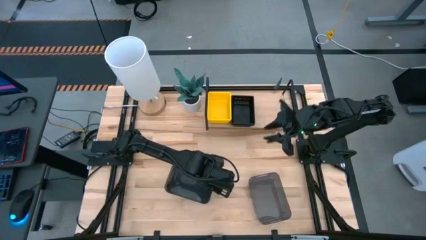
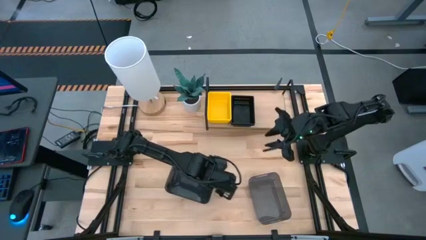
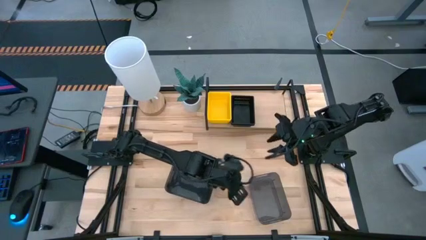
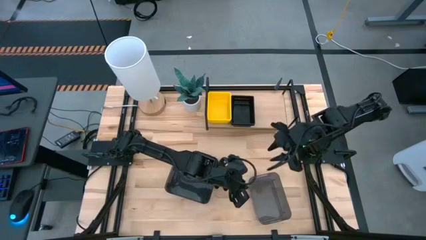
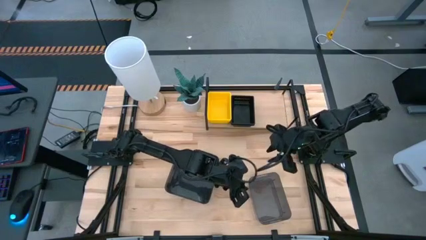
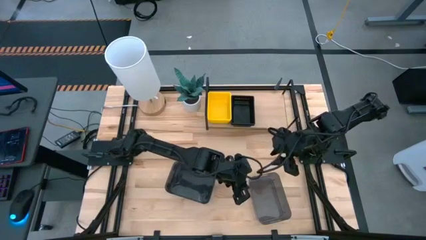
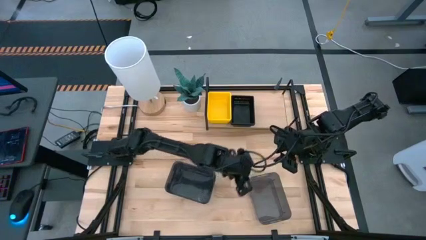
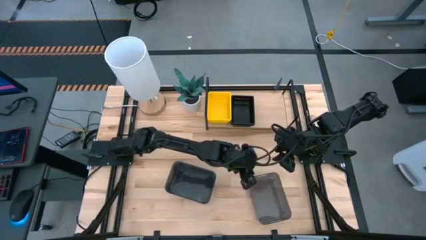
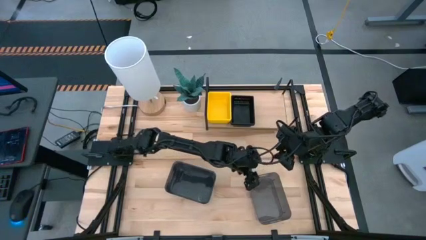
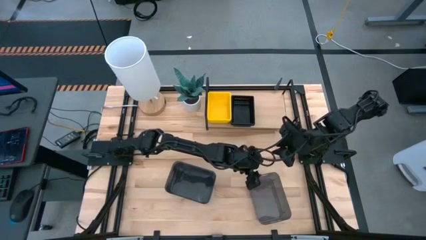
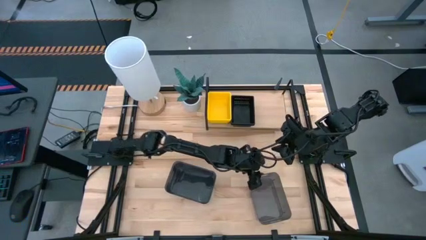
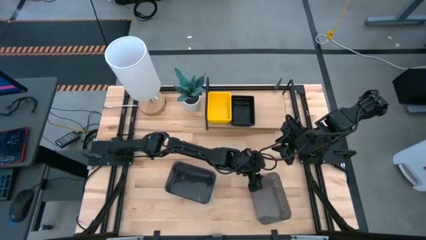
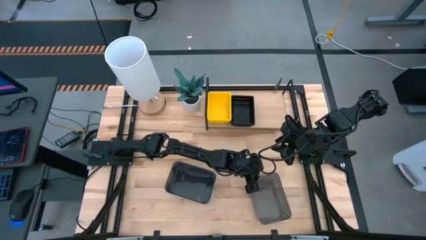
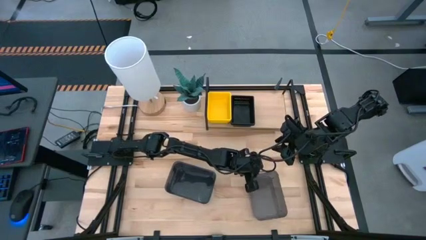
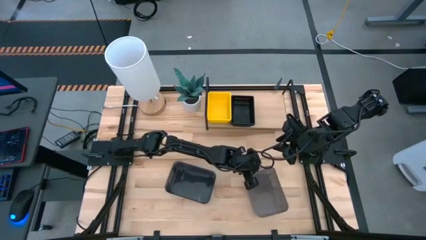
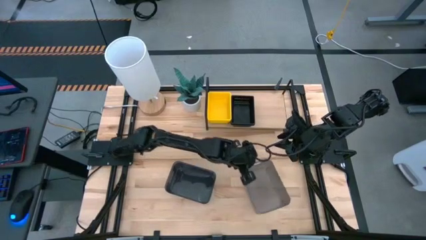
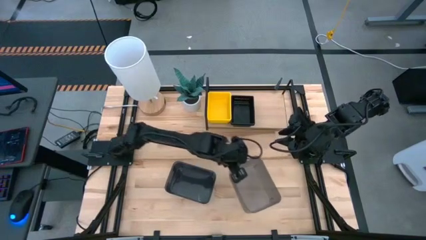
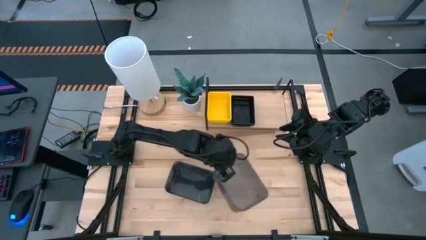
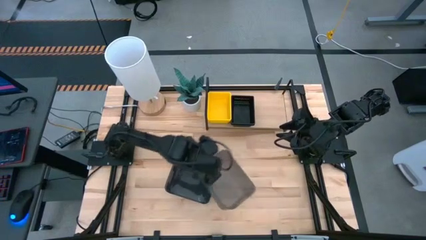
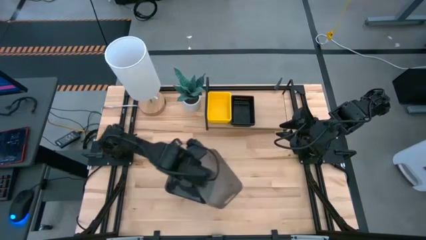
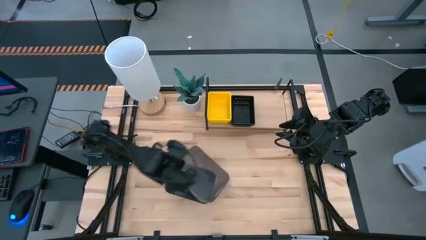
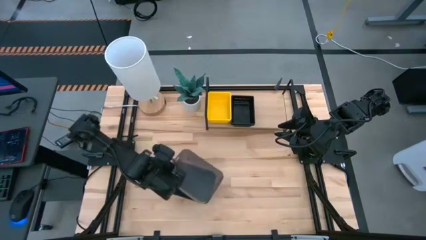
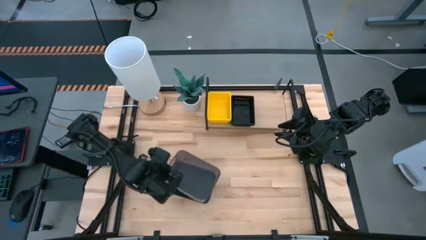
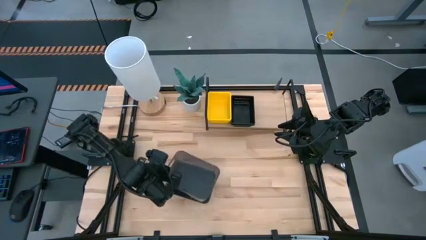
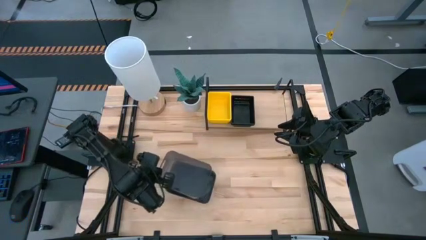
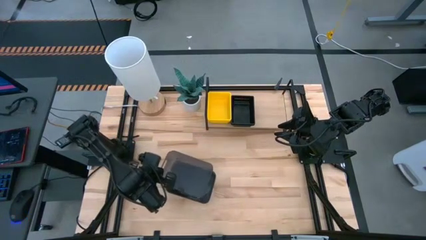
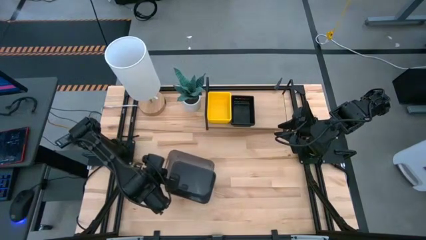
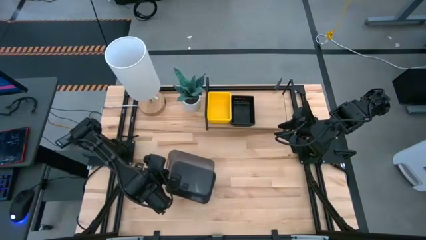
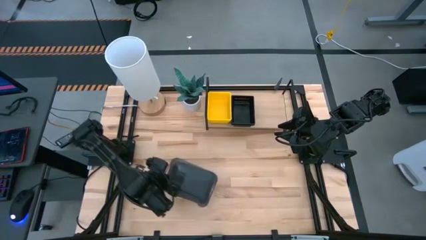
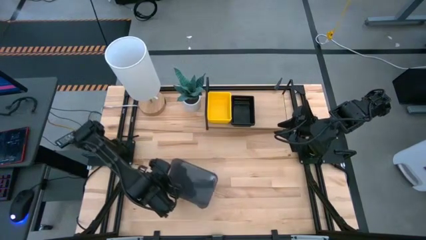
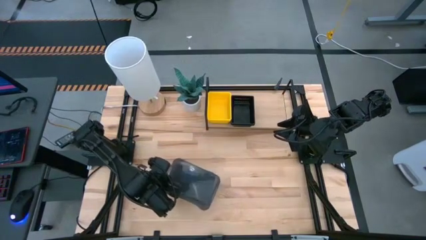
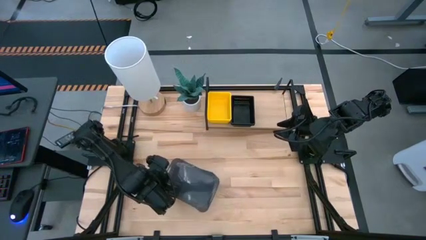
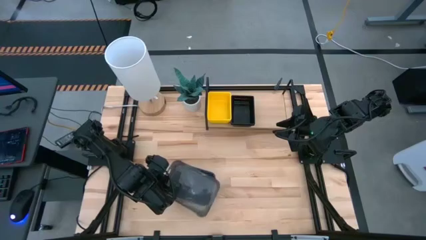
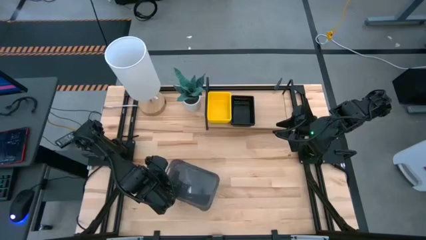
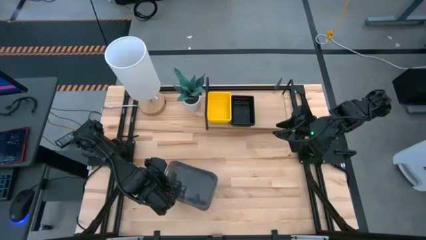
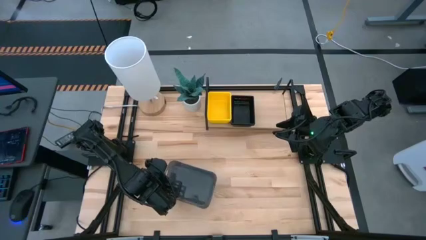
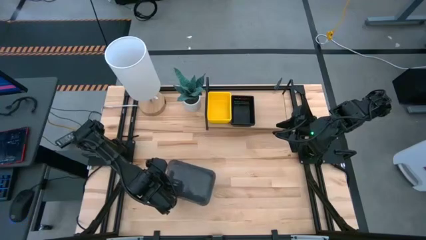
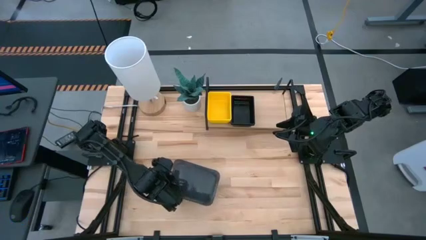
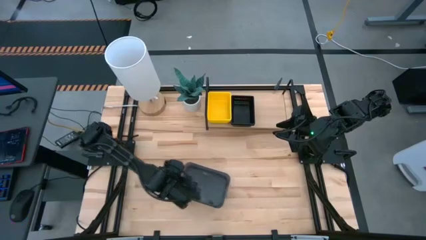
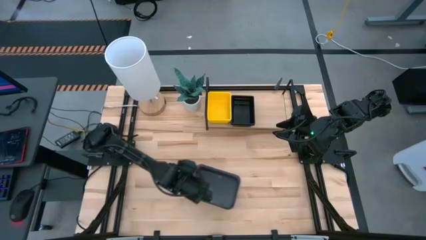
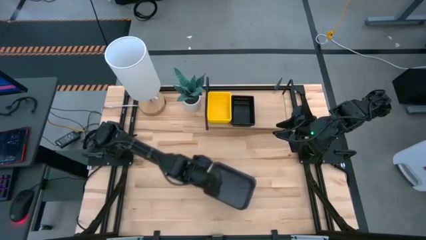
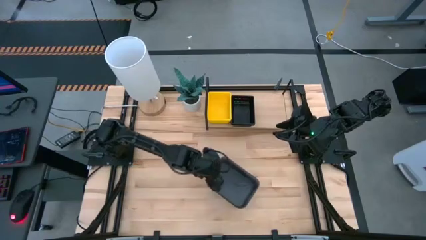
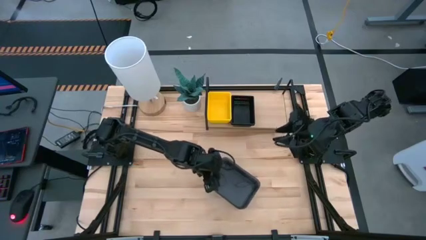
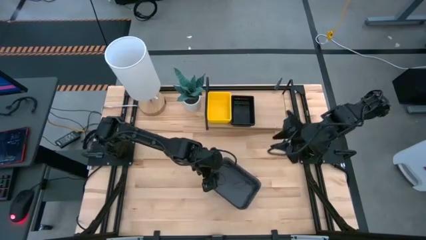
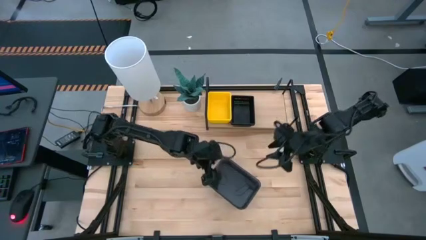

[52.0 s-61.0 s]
Task: Stack baskets on shelf by color
Stack the right gray bin on the left gray bin

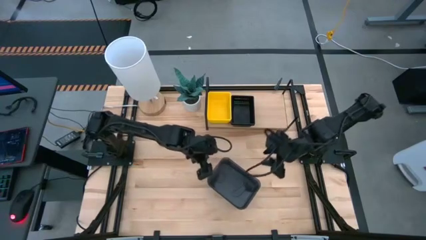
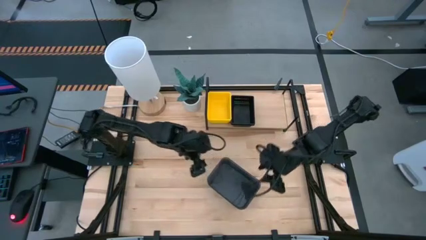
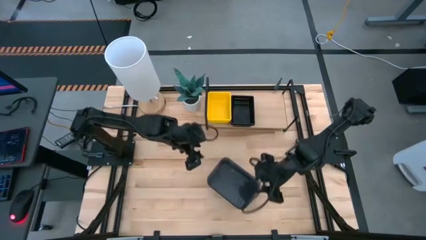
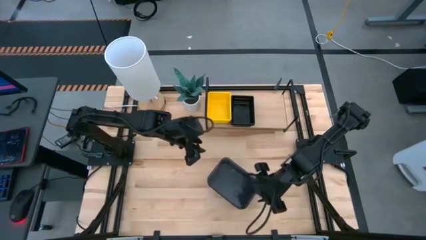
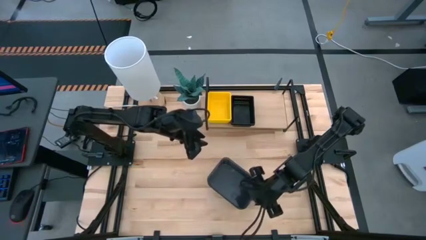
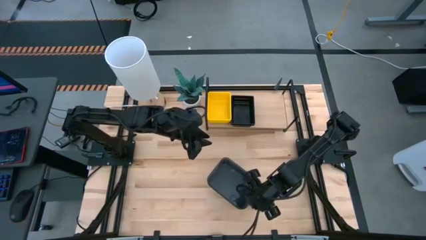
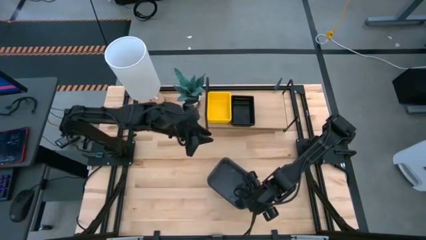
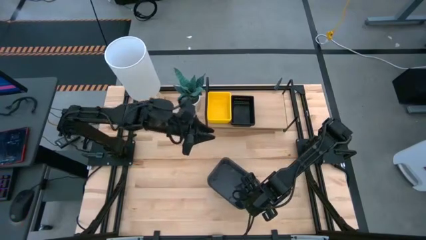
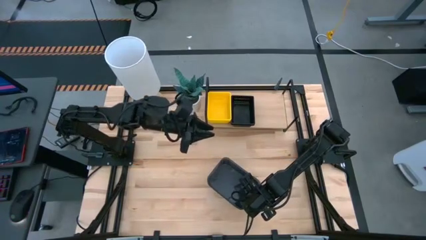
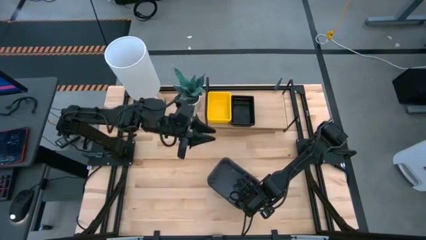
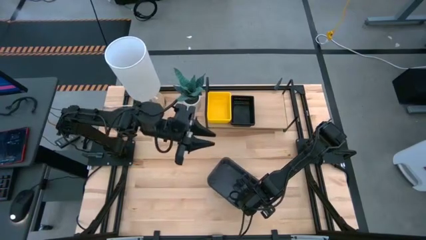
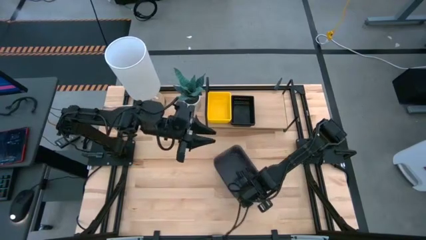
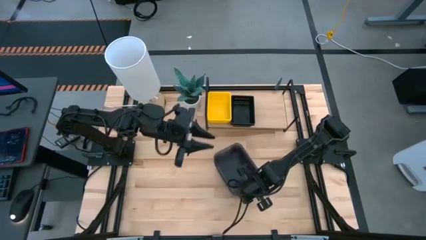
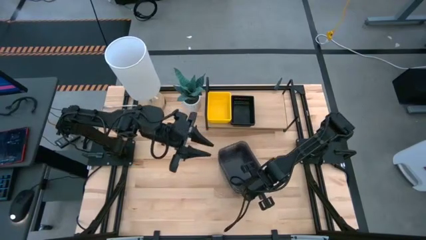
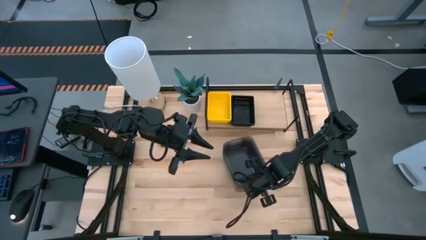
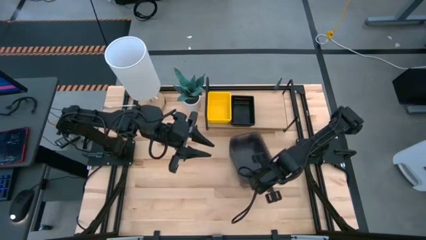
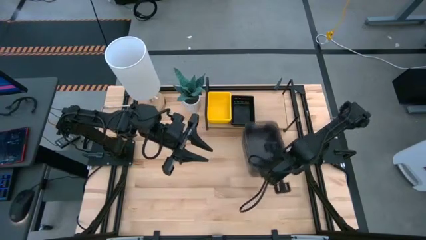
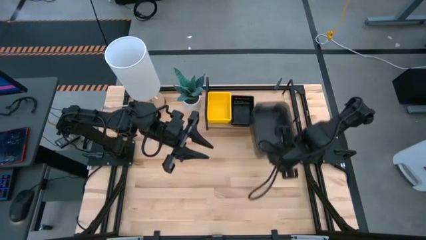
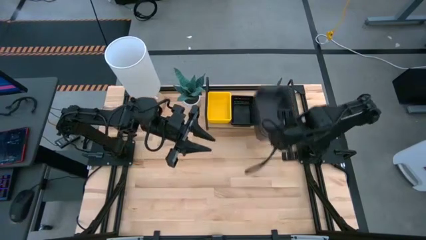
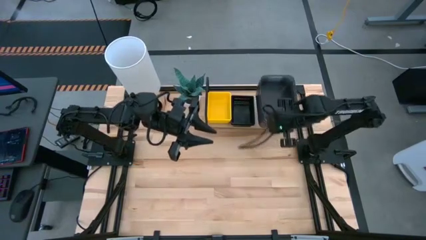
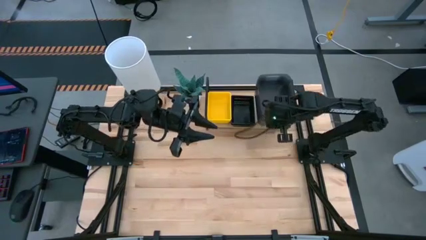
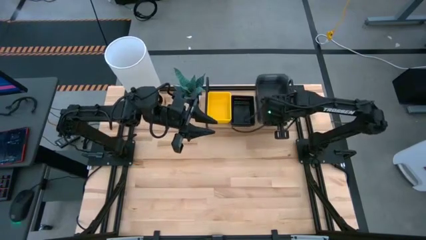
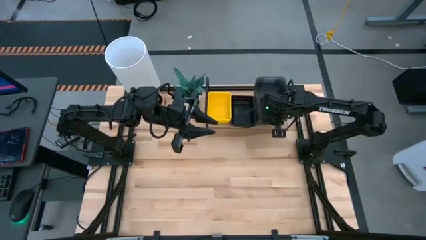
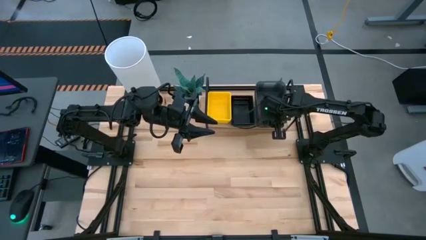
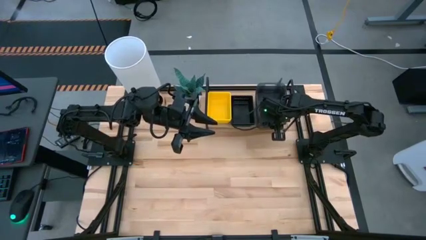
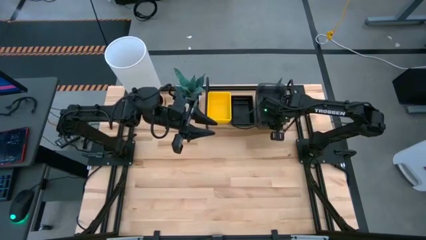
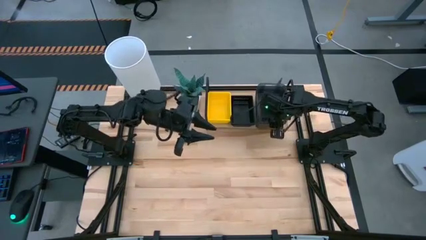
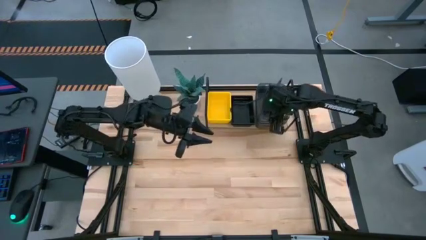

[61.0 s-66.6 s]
Put the stacked gray bins on the shelf

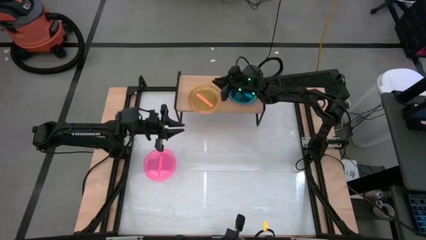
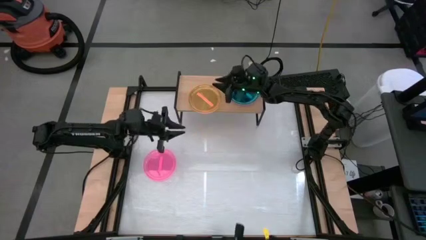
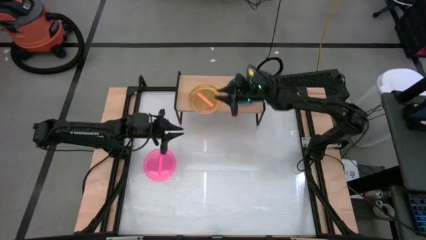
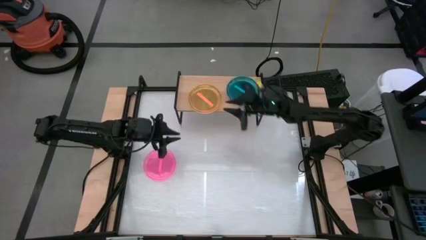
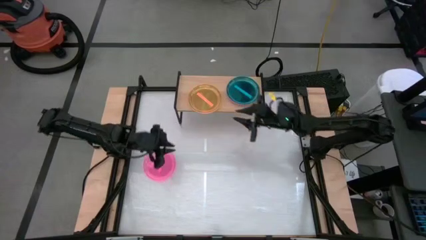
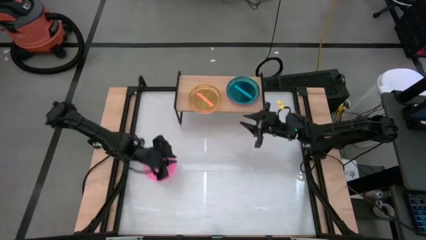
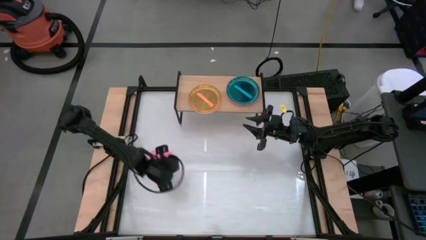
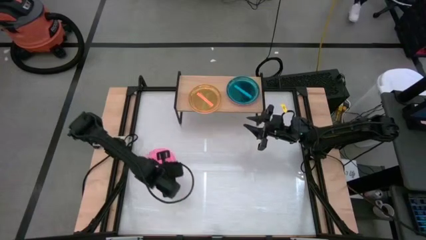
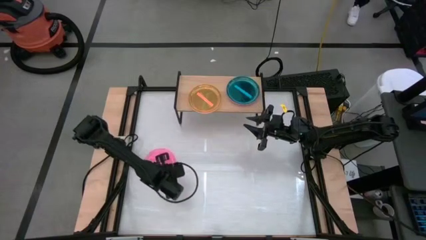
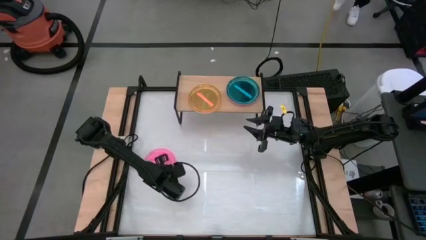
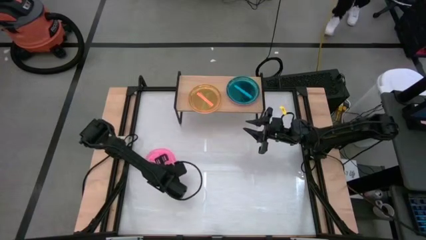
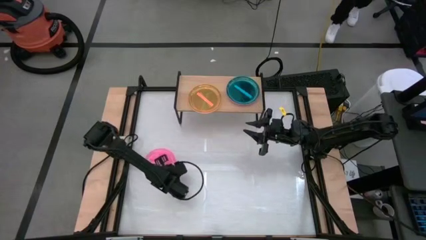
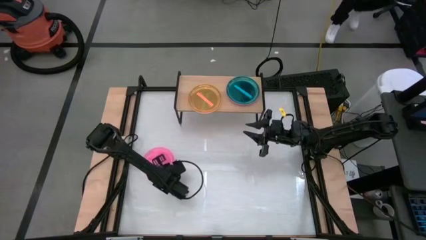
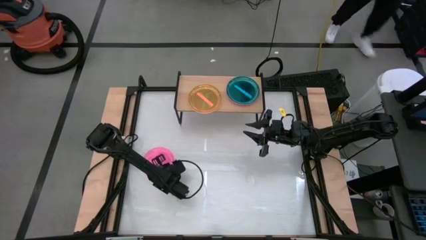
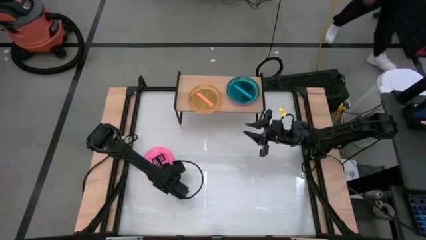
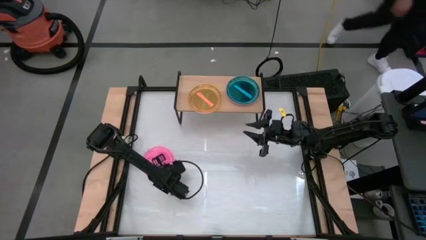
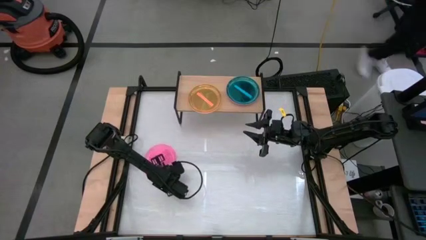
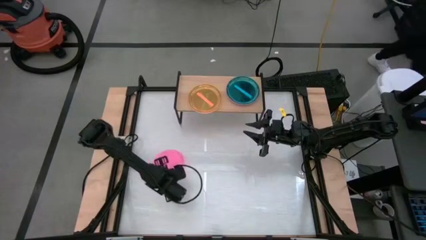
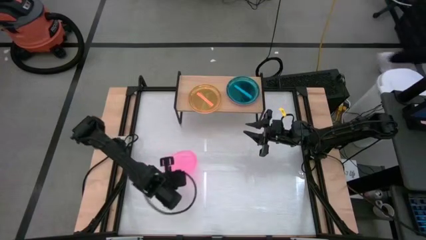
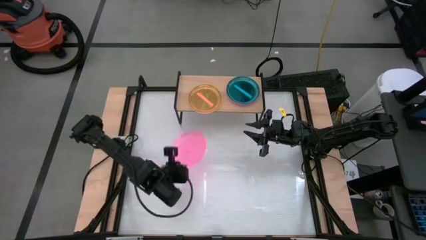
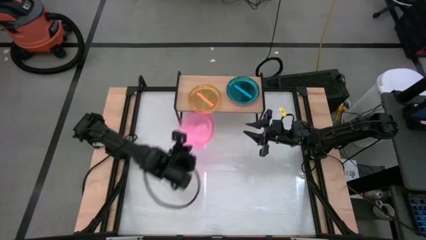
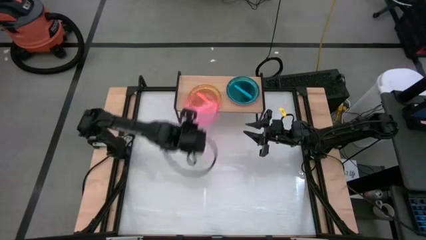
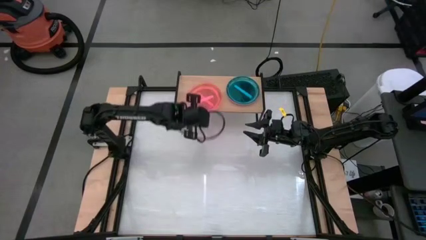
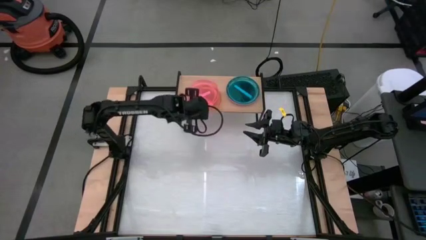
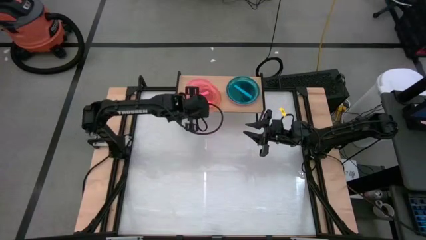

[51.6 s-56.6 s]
Task: Place and stack plates onto a shelf
Stack the pink plate on top of the orange plate on the shelf
